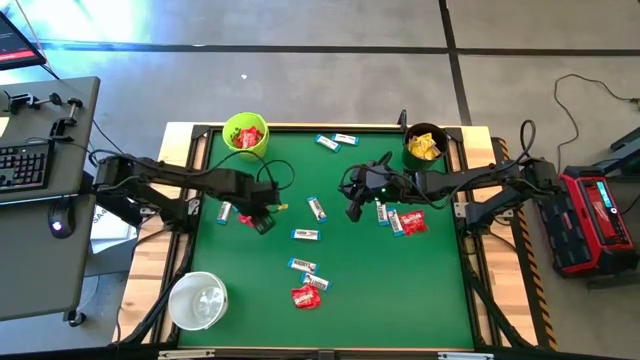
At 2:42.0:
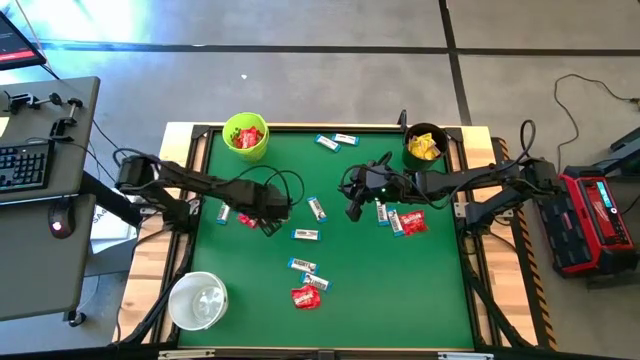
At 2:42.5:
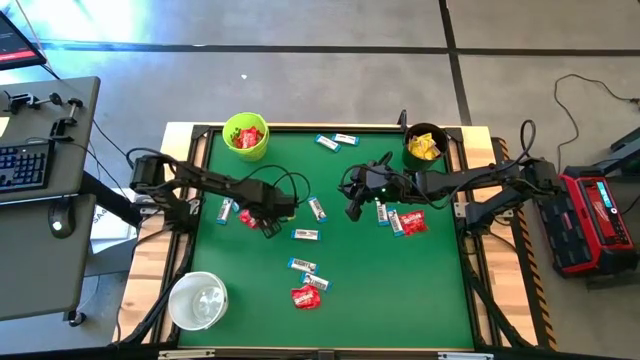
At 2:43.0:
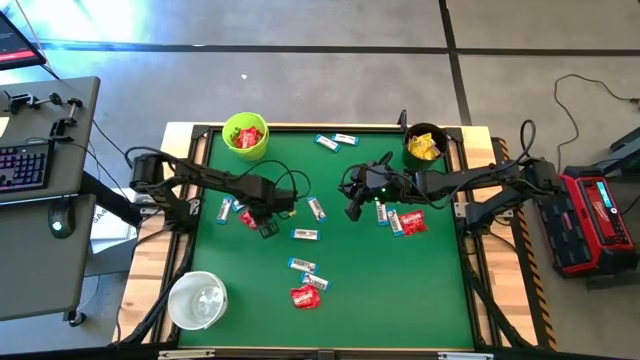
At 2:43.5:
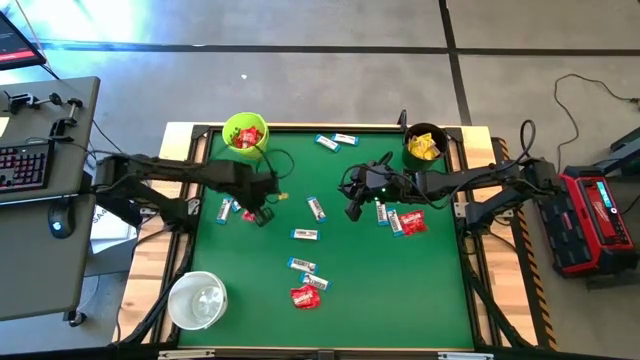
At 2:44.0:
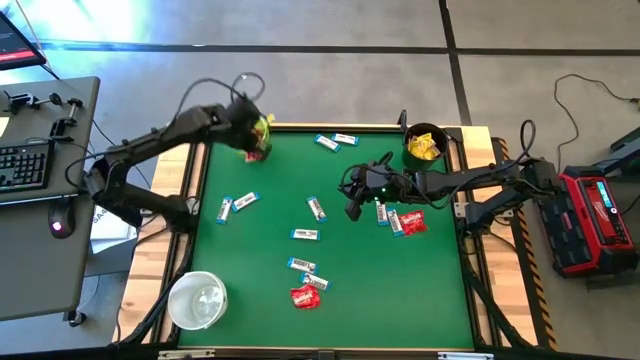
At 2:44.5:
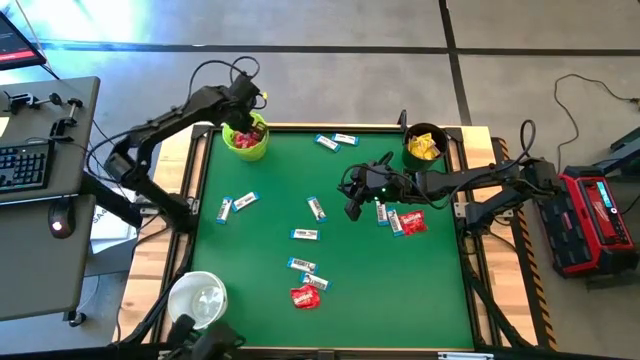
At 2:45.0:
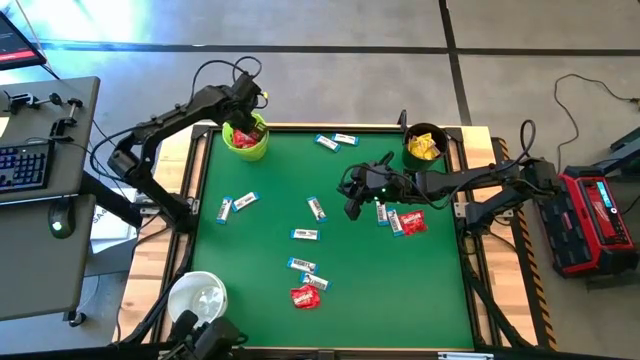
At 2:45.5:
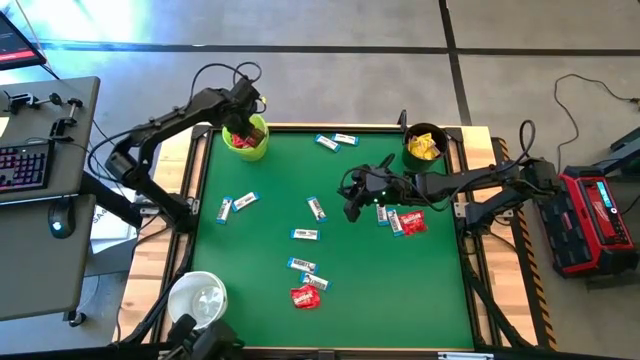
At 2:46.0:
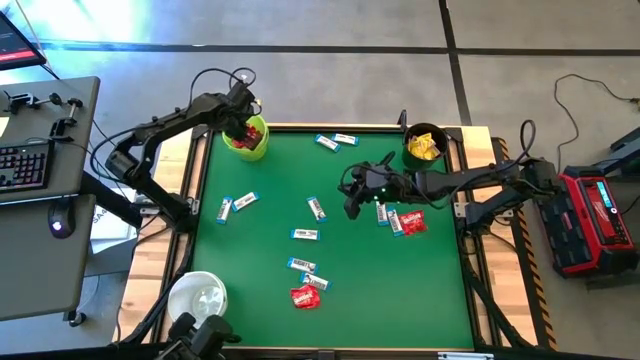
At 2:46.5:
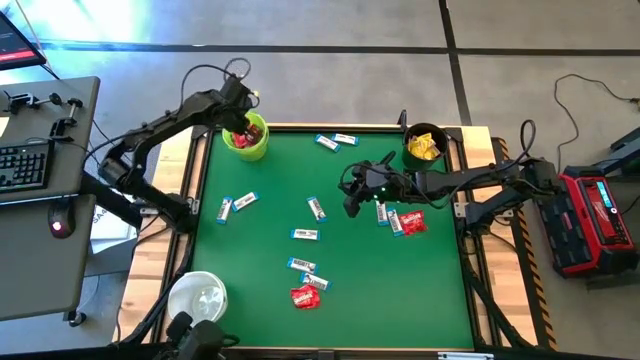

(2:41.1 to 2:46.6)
Task: Sort candy by brand, put in halloween buckets
Put the red candy into the green bucket

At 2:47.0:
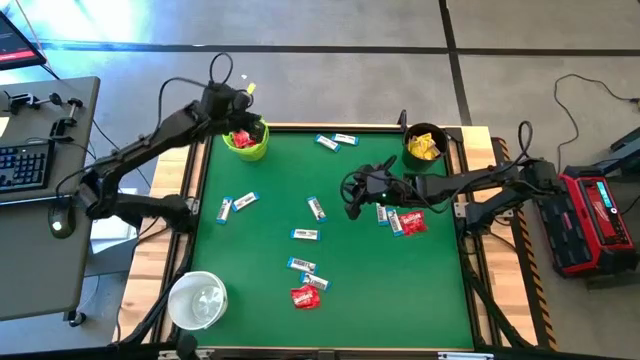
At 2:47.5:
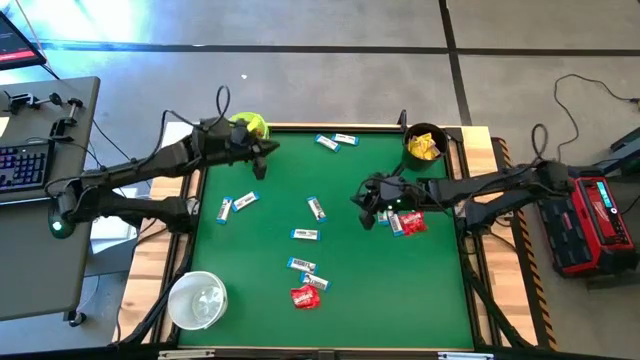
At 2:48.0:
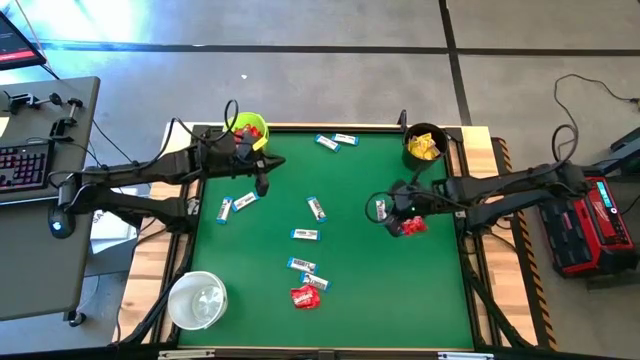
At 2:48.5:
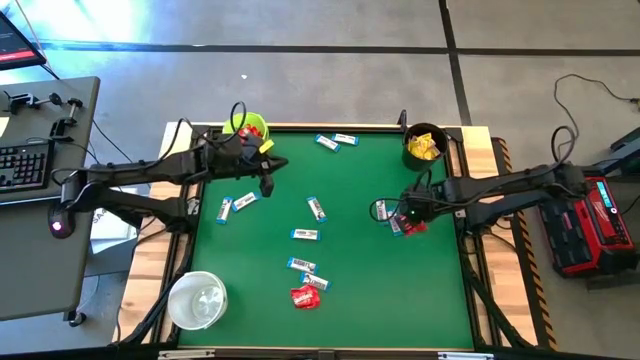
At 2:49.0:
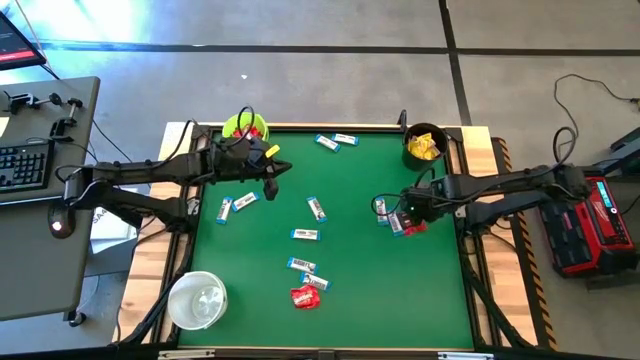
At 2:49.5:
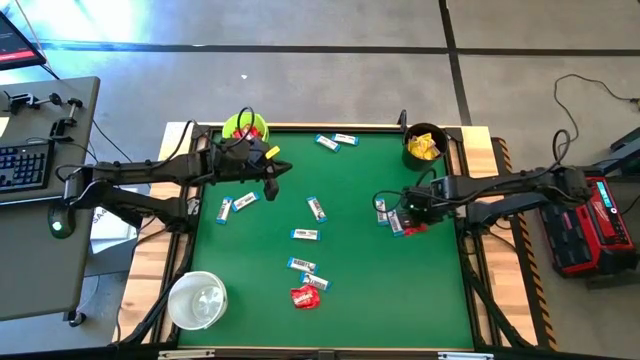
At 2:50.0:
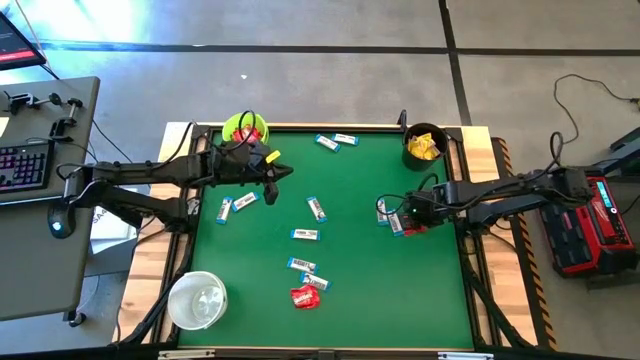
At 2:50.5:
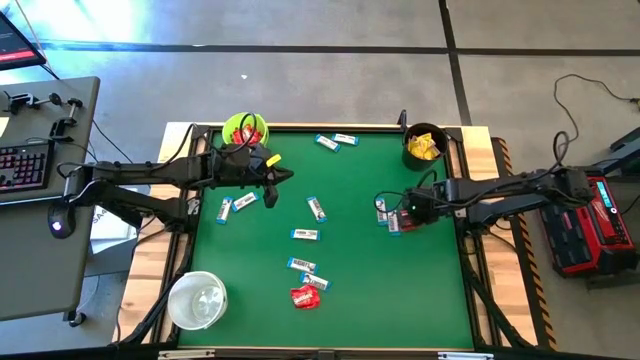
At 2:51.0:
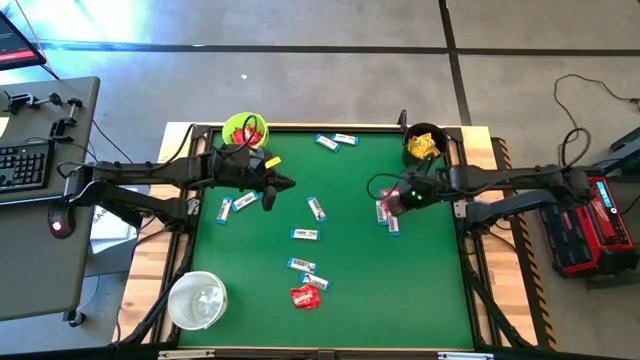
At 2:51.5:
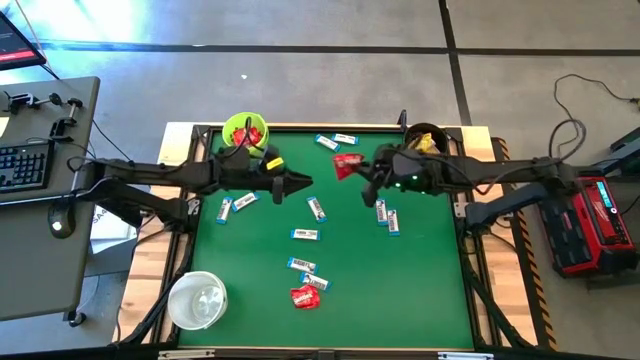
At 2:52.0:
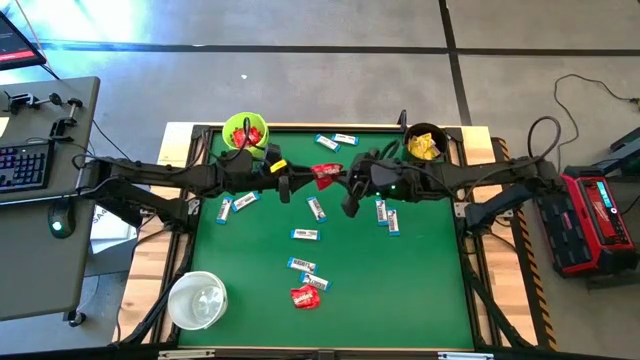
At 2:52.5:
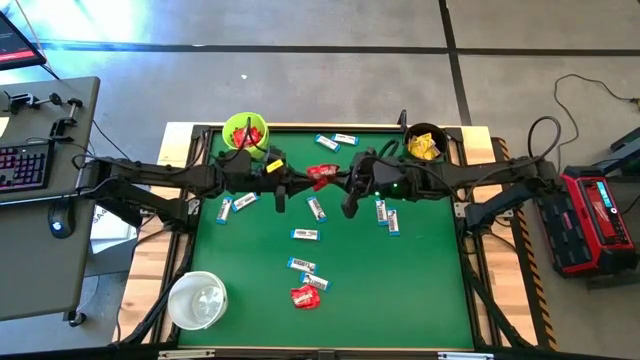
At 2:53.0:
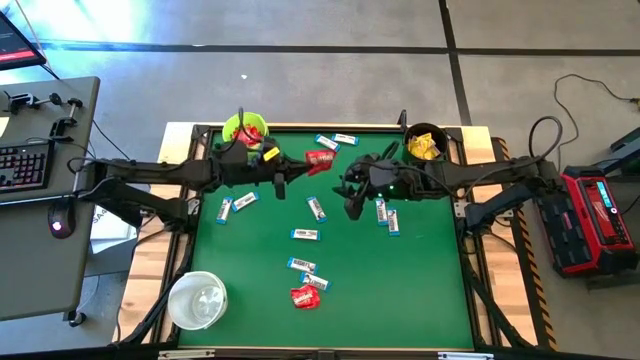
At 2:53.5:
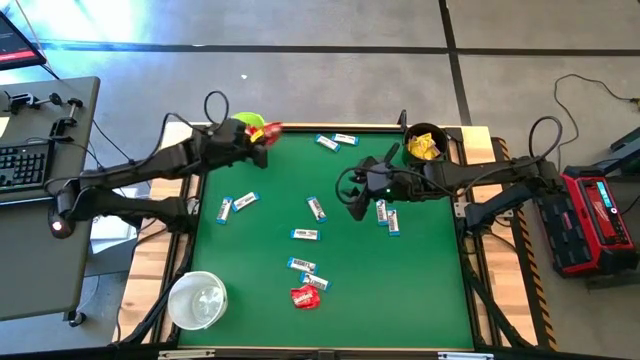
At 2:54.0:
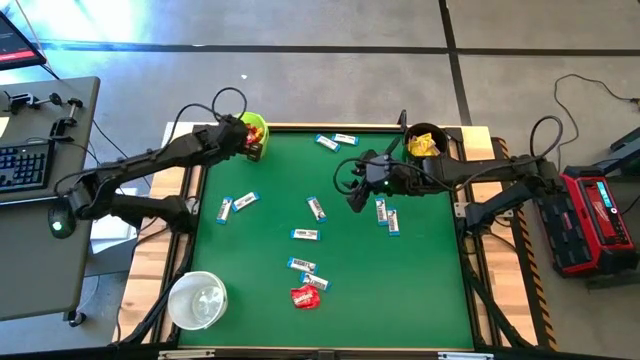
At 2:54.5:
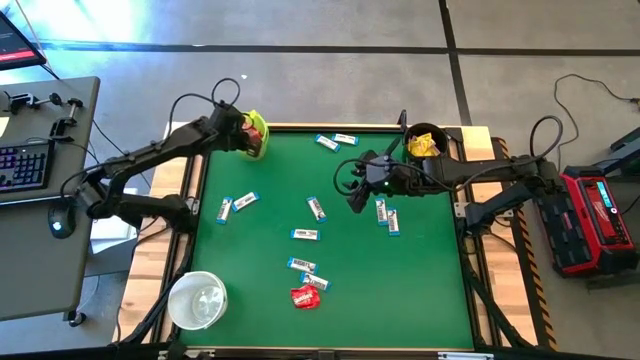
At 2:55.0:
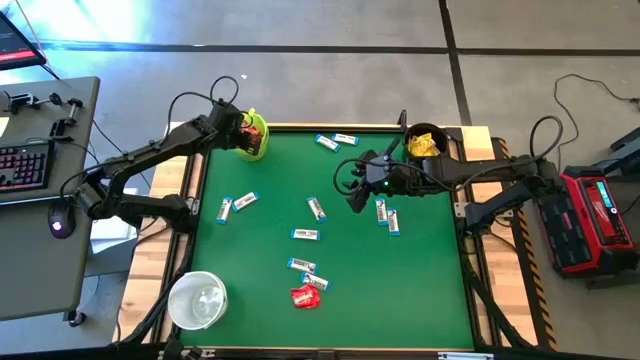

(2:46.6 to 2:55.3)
Put the red candy into the green bucket

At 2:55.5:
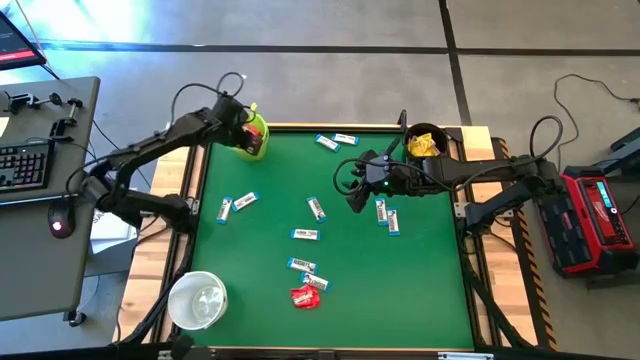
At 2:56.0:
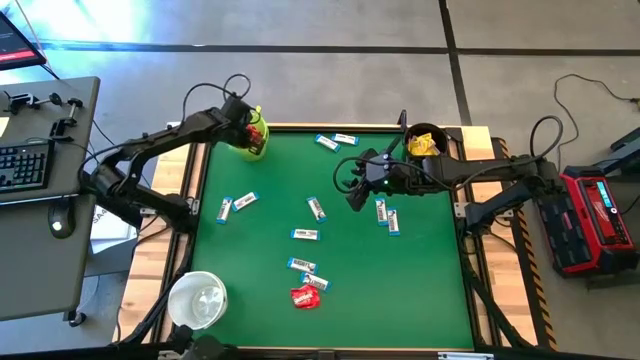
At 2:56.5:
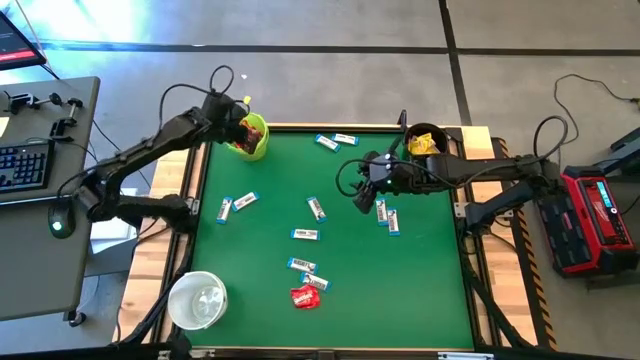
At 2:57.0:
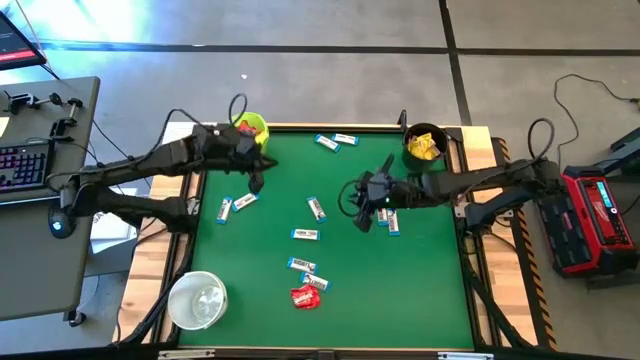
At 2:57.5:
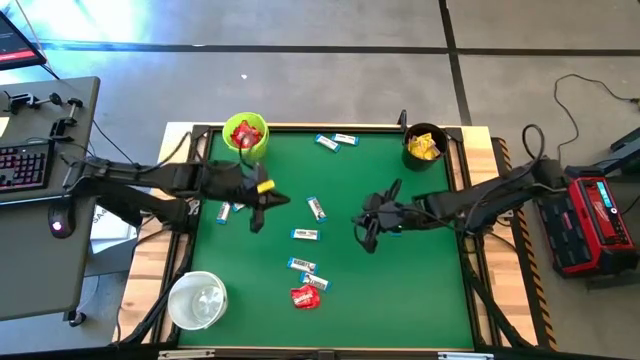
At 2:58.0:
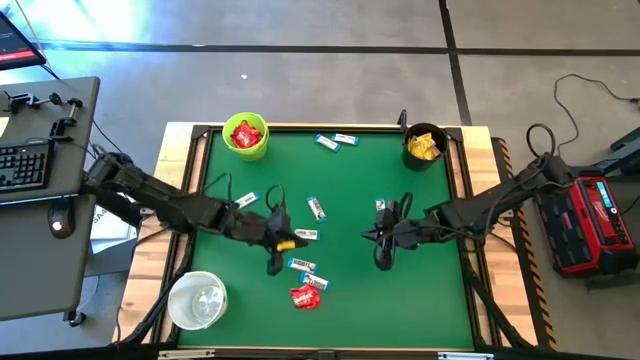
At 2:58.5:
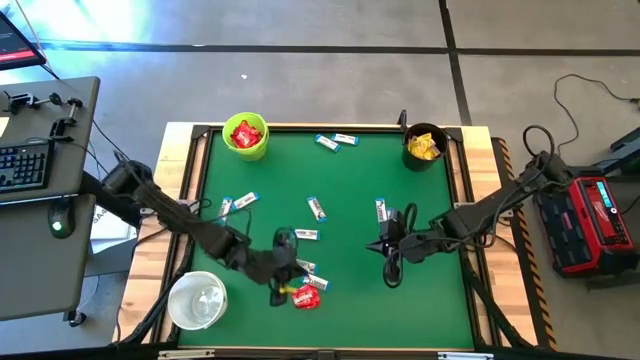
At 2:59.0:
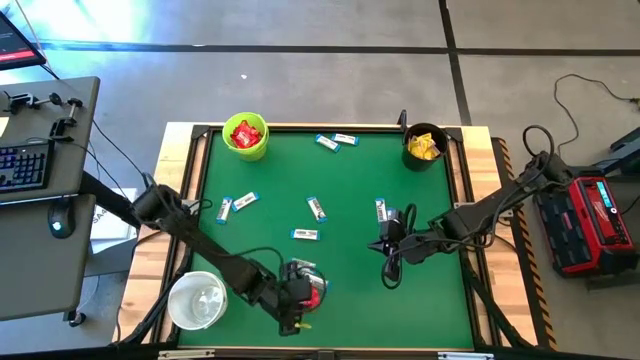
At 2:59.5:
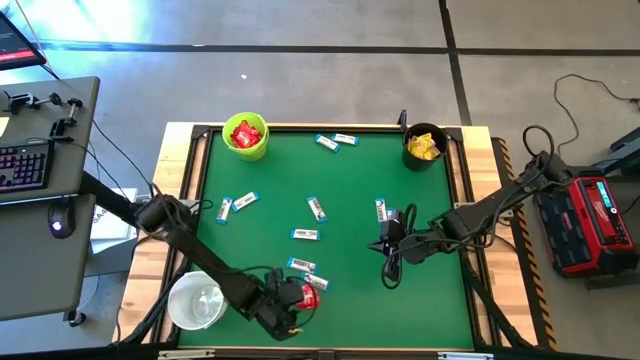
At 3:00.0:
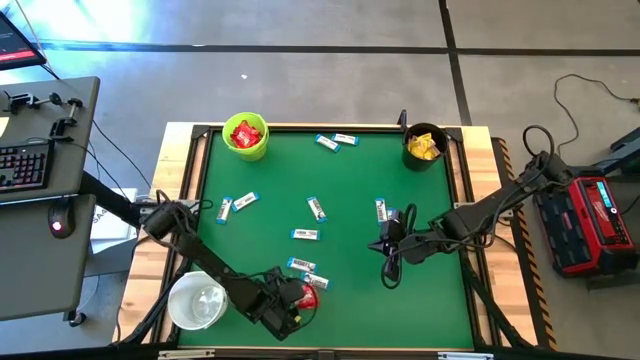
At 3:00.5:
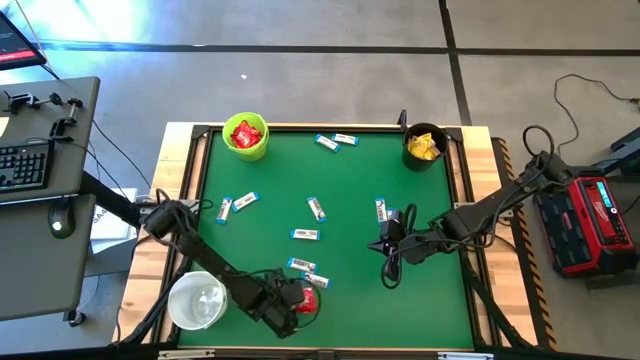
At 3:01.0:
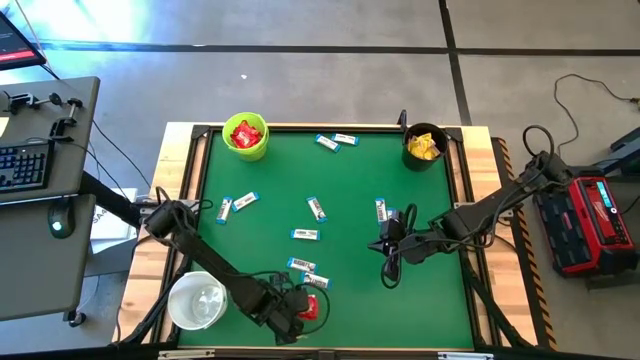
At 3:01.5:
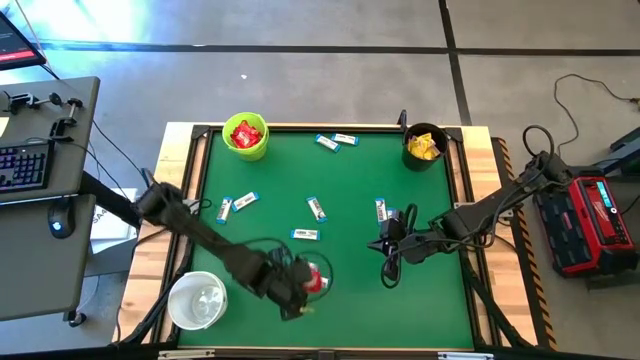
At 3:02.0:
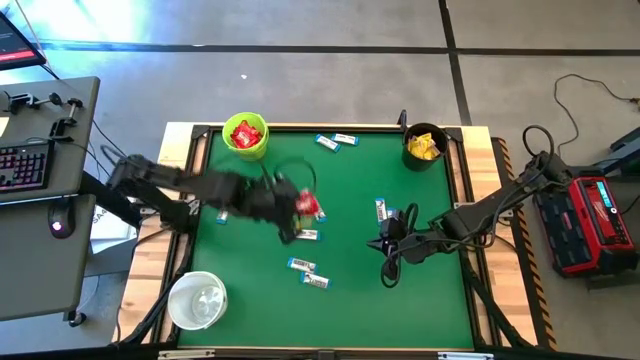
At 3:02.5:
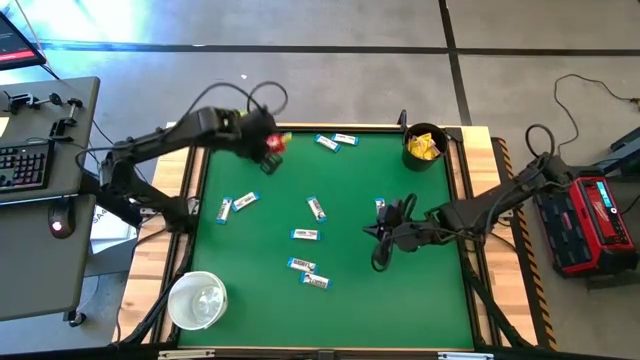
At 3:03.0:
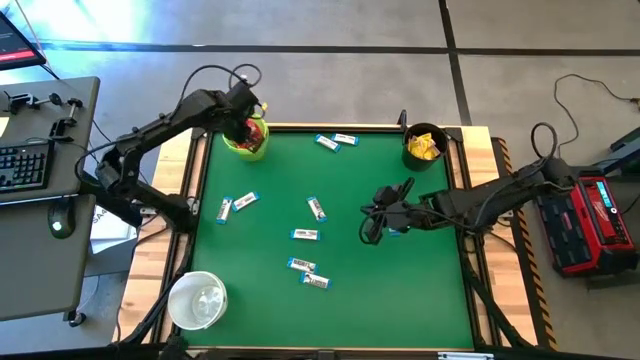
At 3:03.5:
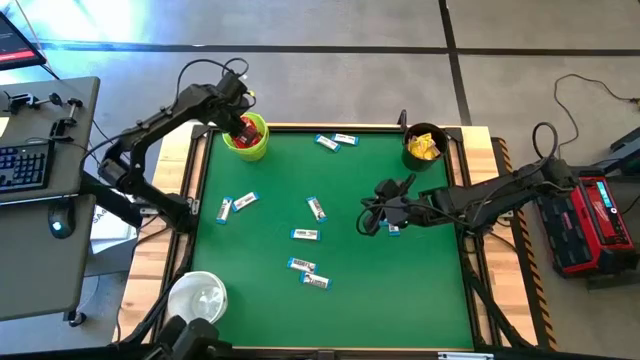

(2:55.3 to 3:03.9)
Put the red candy into the green bucket
